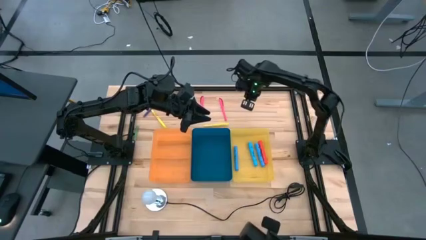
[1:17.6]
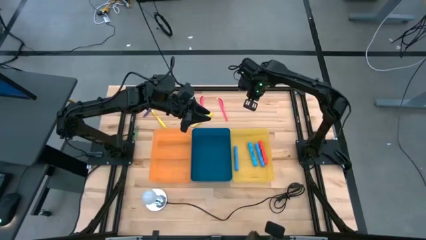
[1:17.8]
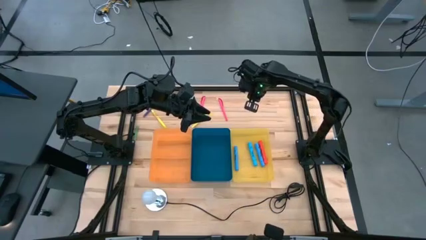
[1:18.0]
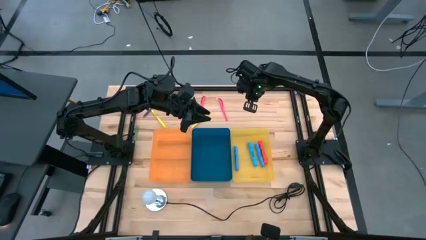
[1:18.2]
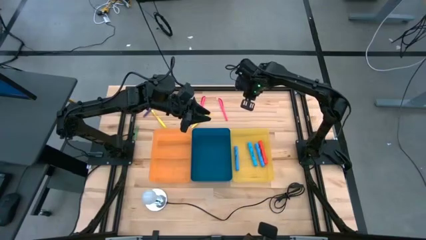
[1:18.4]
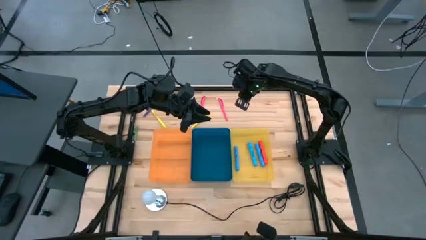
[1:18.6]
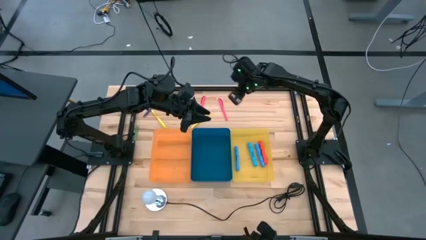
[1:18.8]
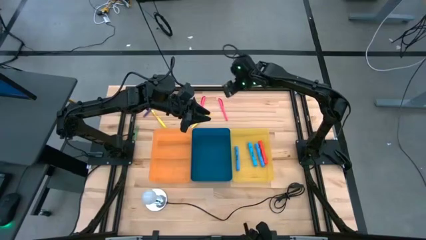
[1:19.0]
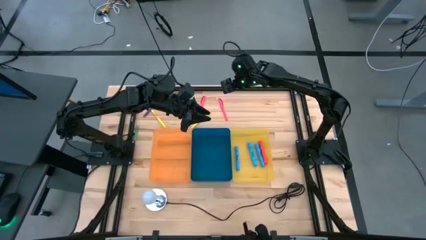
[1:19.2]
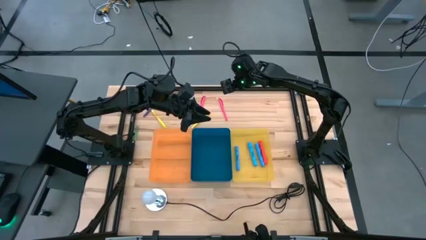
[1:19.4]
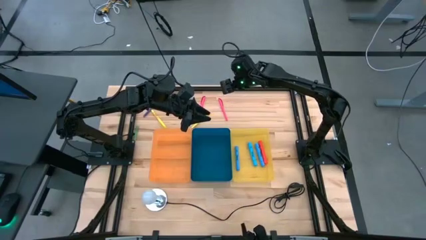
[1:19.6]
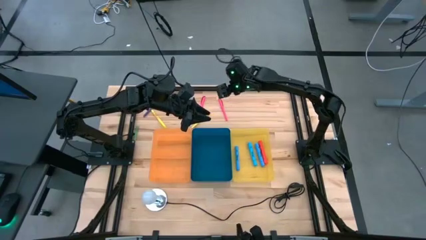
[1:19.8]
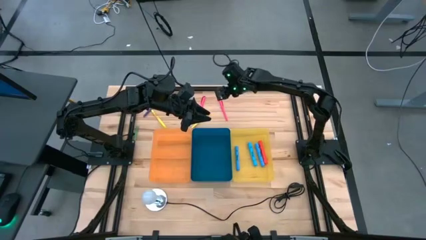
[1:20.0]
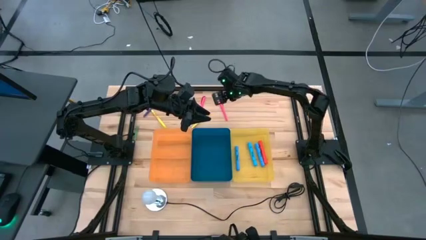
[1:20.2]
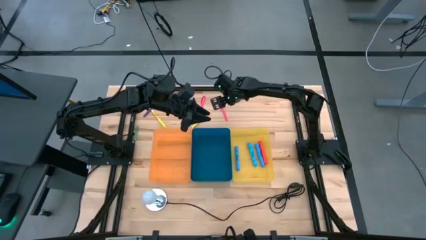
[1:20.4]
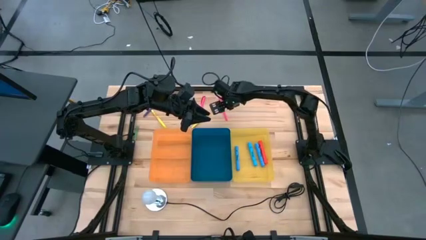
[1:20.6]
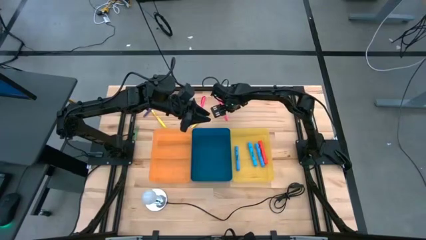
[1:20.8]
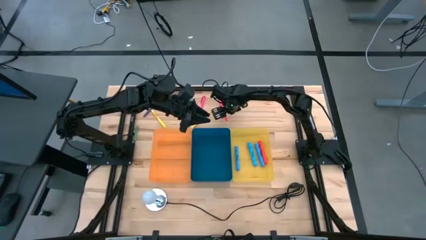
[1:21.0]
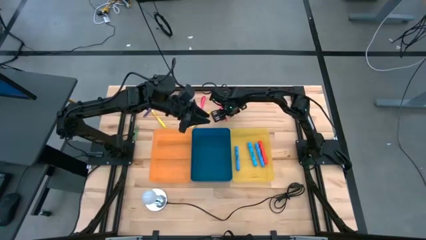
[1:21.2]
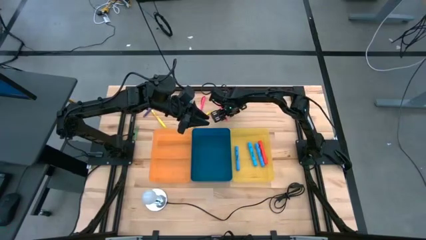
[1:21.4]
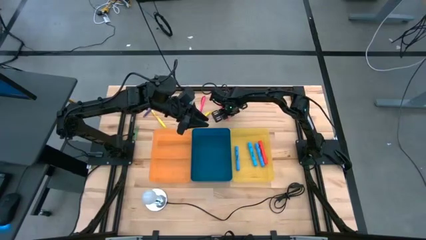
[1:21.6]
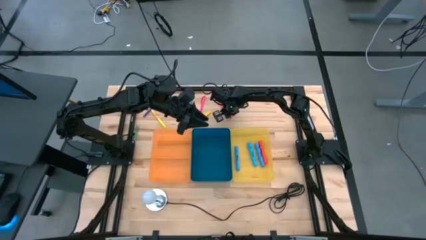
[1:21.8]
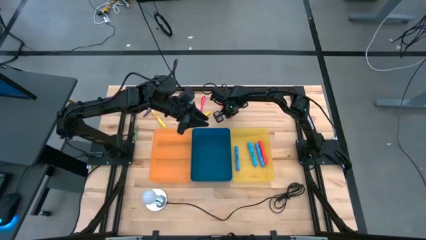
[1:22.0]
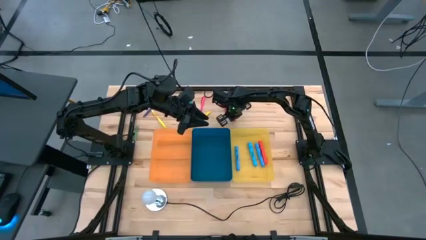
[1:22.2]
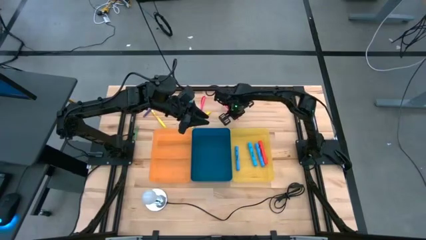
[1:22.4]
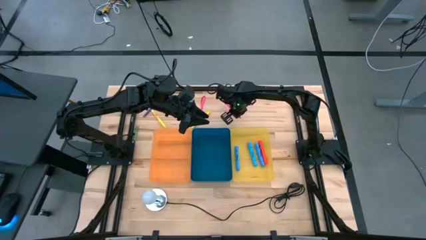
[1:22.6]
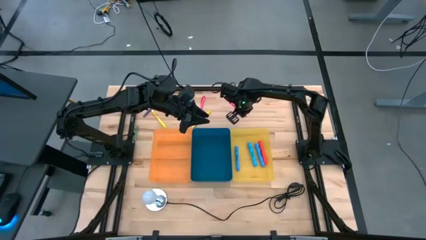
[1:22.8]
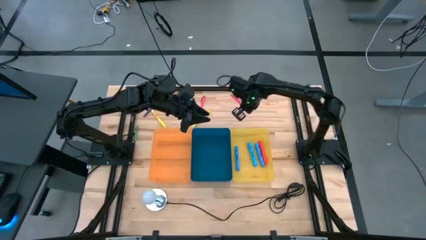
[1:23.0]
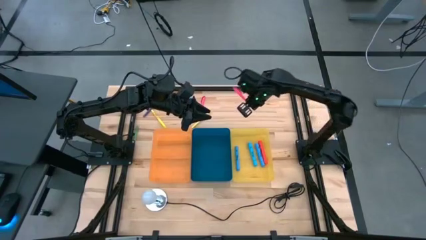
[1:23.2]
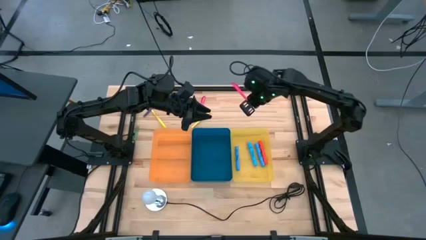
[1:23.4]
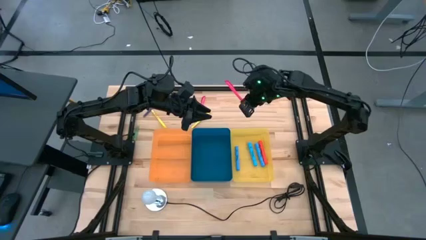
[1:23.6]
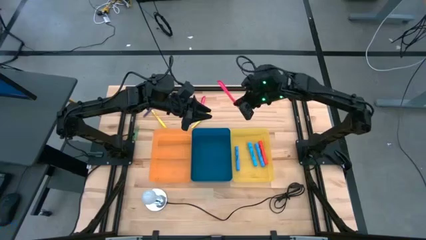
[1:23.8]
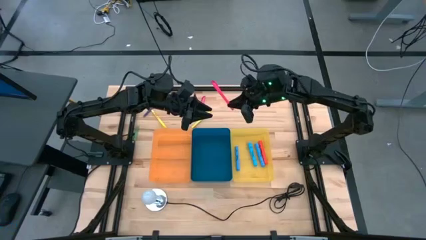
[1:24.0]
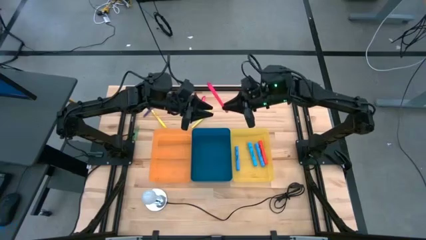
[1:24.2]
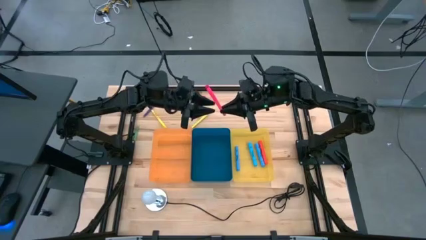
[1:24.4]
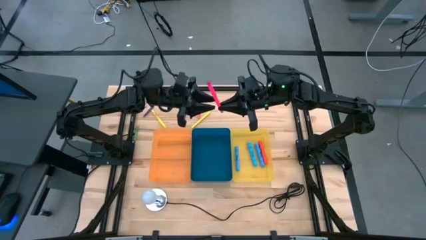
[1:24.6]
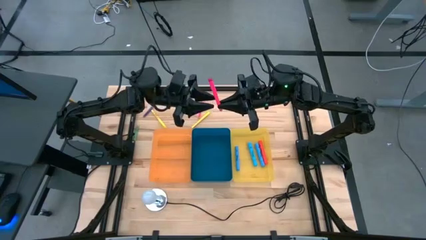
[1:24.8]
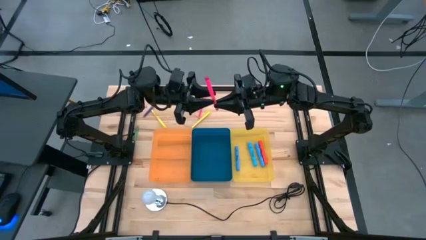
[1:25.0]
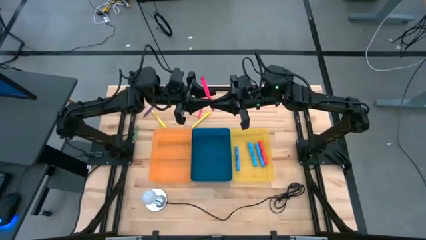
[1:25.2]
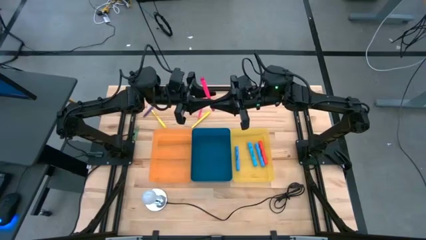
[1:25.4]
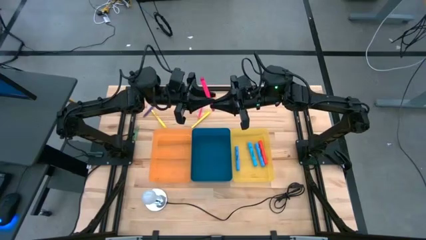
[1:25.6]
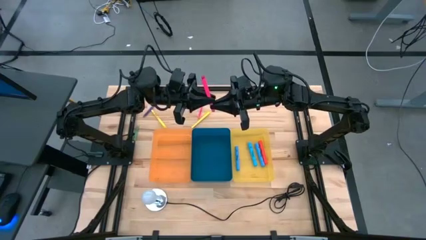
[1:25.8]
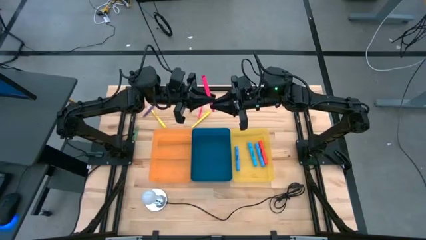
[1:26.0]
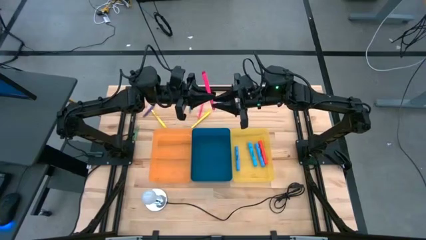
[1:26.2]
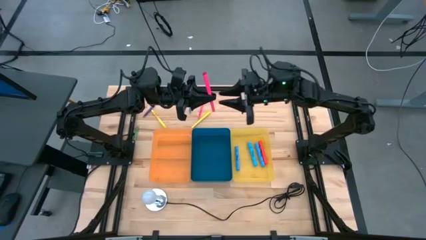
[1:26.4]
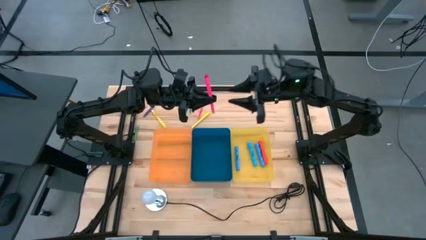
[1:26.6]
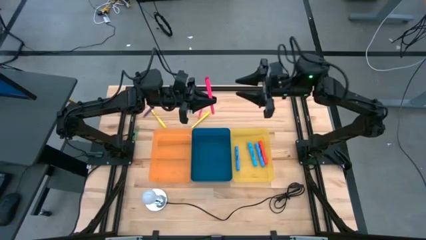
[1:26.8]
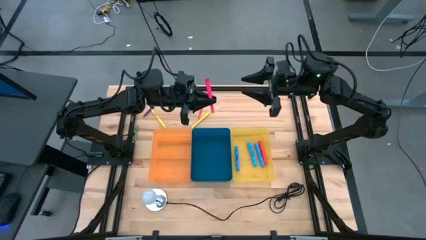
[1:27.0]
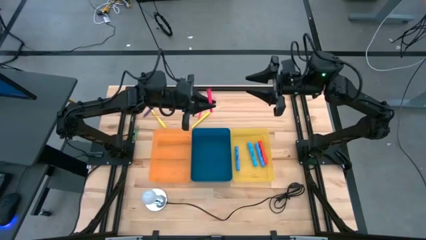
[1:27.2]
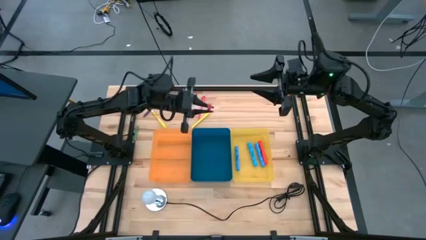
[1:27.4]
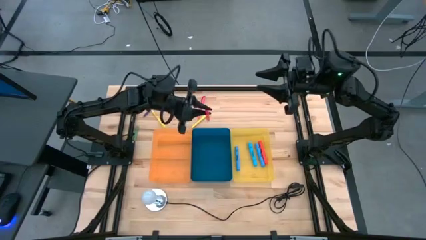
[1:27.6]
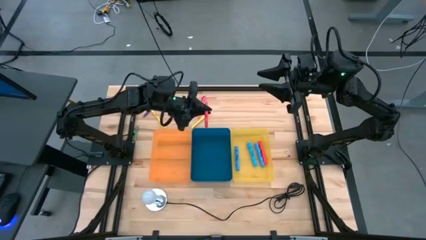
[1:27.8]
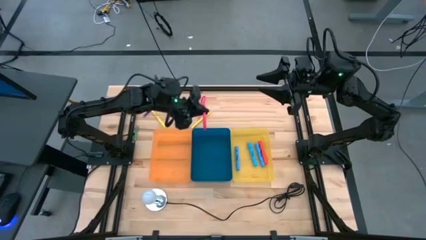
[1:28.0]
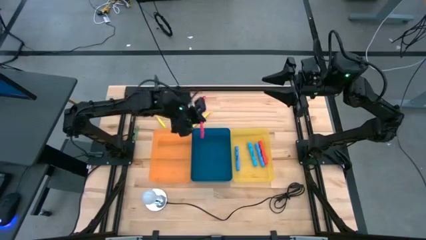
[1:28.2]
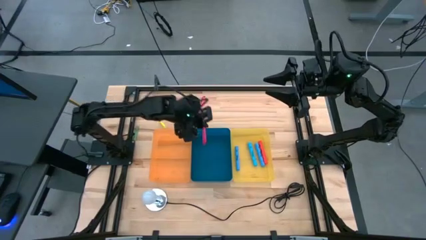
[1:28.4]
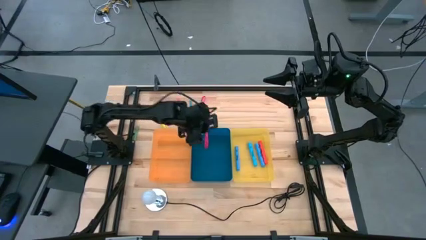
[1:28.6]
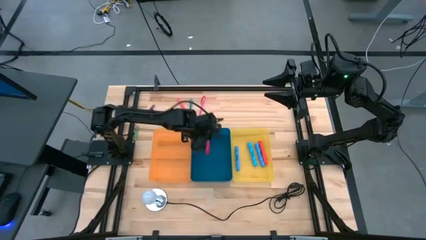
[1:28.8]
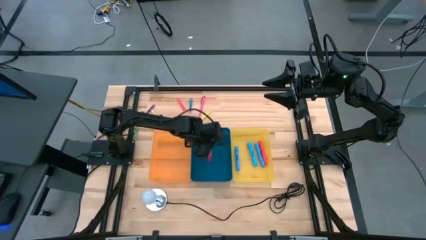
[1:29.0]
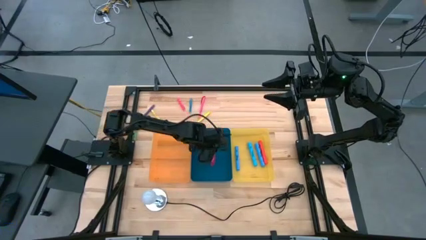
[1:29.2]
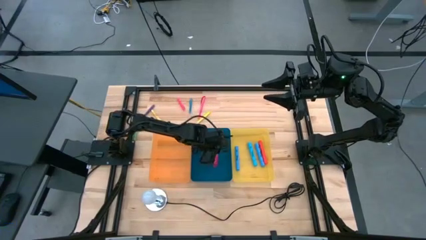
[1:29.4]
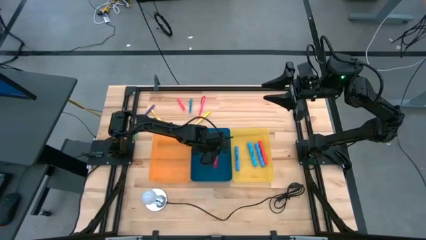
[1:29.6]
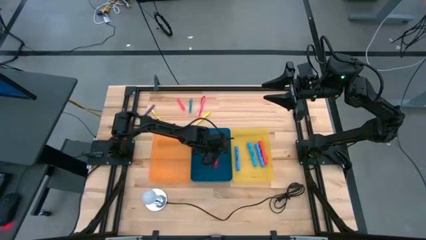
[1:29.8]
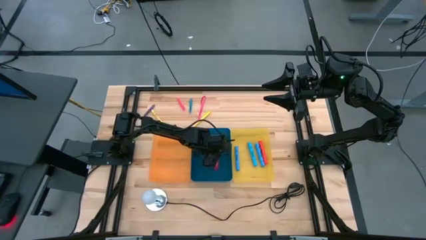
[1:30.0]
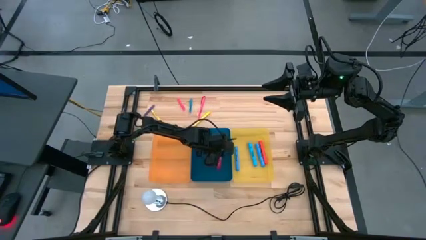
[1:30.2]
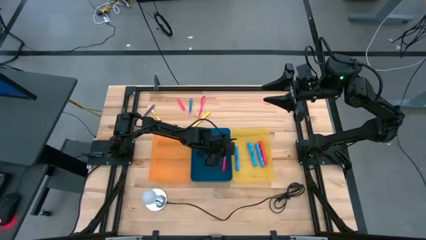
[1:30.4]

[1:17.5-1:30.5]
Task: Pick & Place Markers
Put the right pink pen into the blue bin
